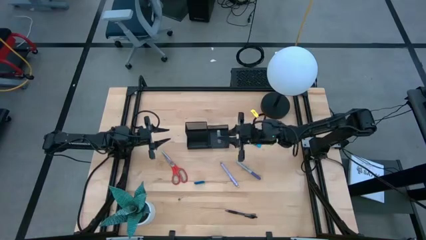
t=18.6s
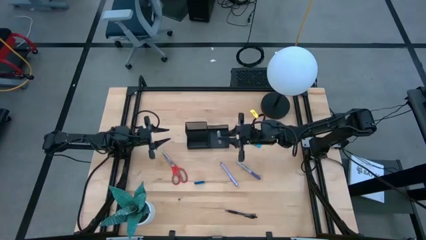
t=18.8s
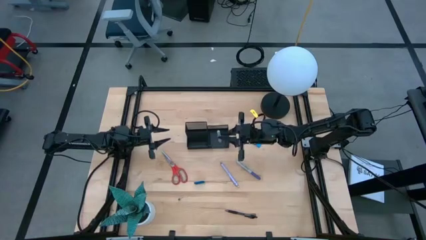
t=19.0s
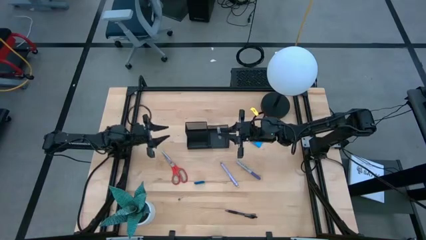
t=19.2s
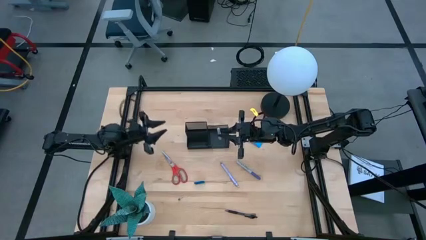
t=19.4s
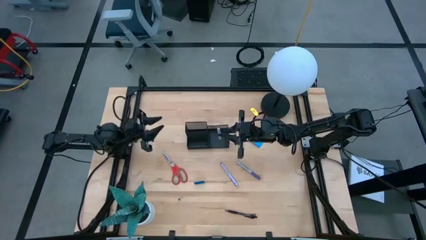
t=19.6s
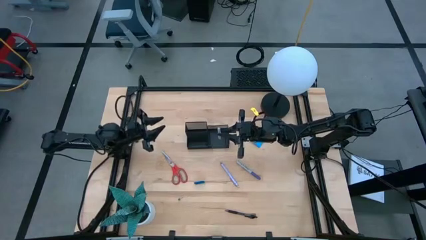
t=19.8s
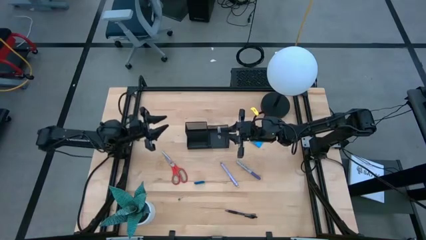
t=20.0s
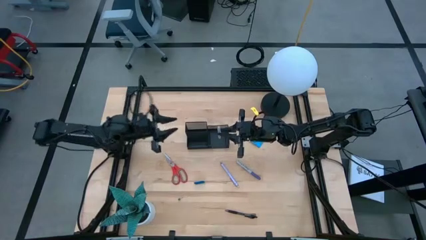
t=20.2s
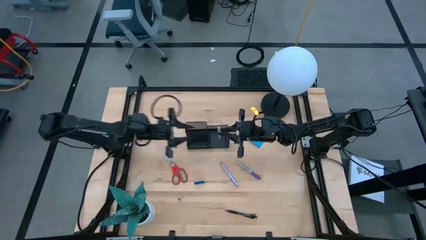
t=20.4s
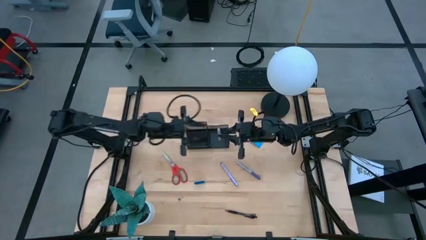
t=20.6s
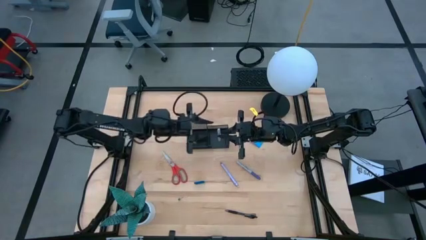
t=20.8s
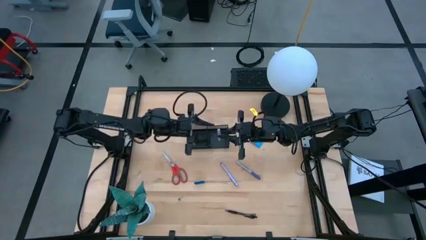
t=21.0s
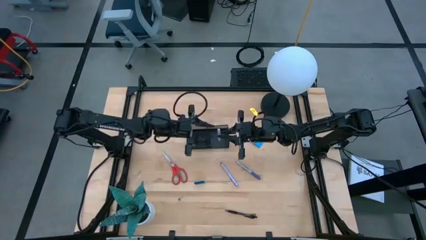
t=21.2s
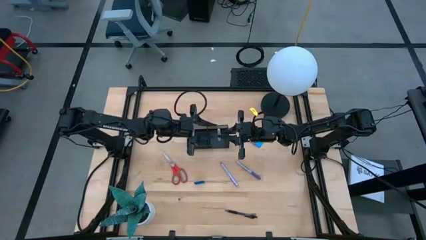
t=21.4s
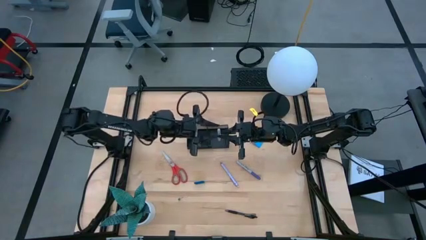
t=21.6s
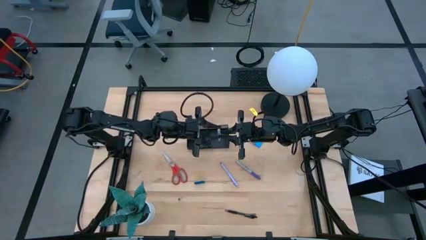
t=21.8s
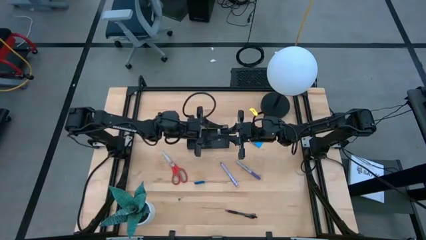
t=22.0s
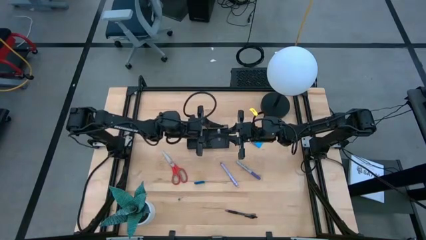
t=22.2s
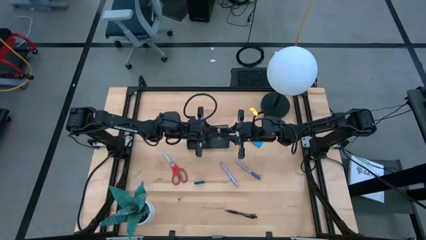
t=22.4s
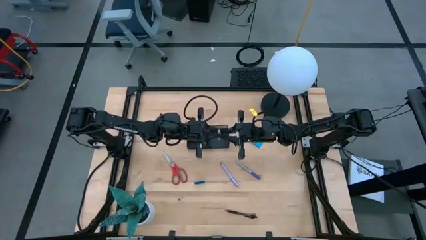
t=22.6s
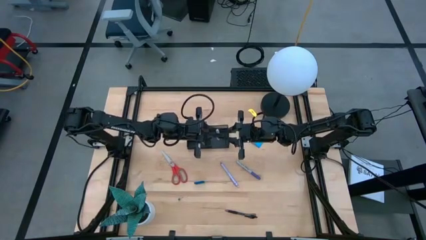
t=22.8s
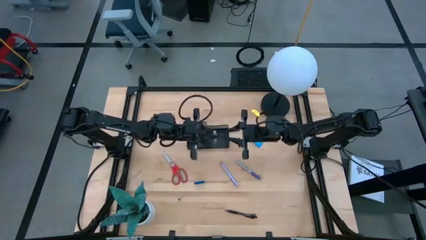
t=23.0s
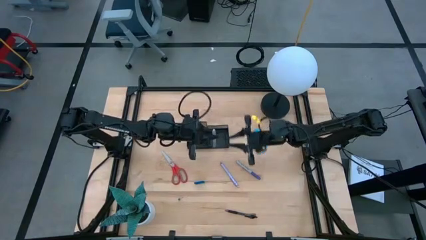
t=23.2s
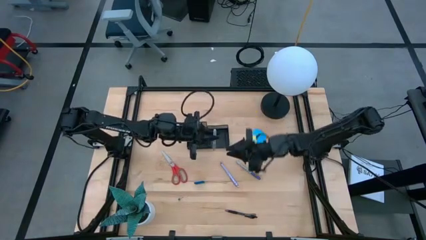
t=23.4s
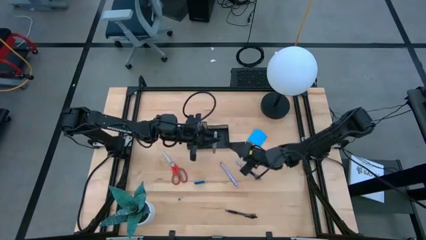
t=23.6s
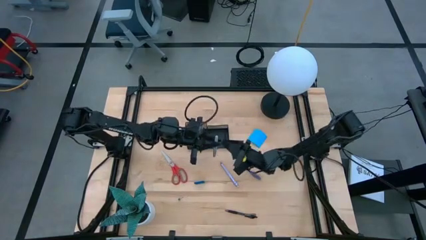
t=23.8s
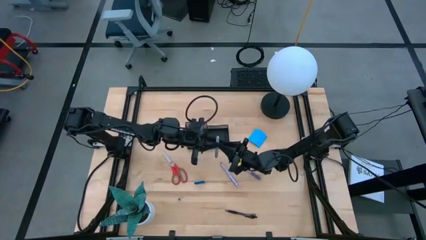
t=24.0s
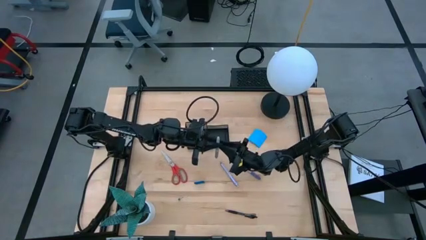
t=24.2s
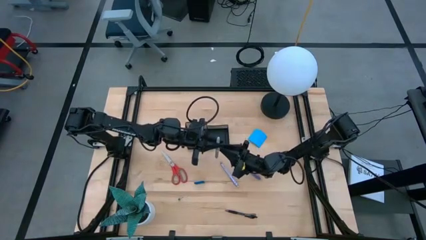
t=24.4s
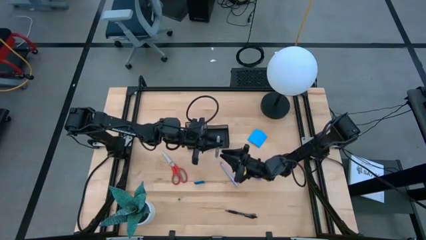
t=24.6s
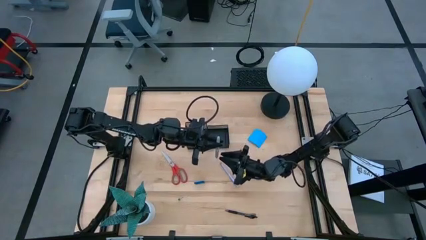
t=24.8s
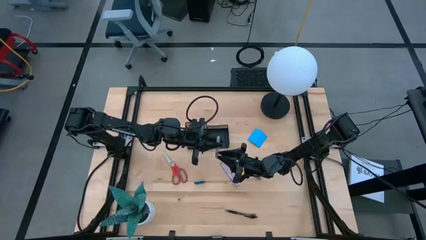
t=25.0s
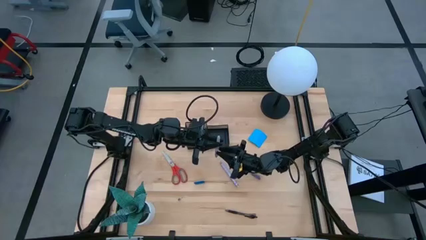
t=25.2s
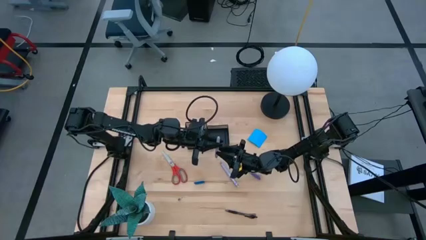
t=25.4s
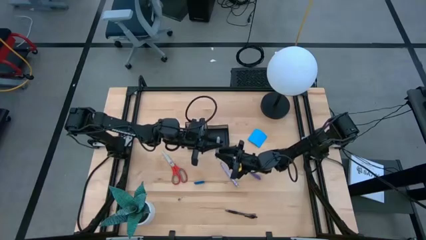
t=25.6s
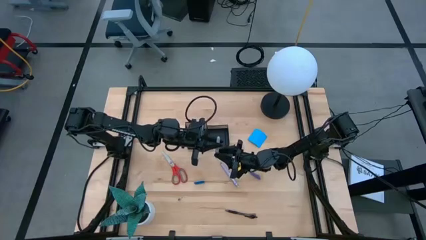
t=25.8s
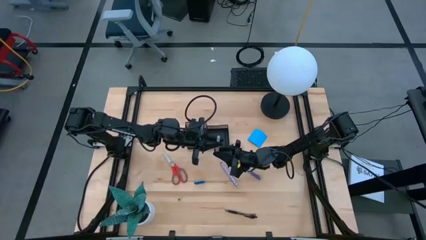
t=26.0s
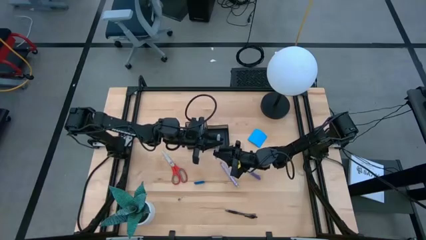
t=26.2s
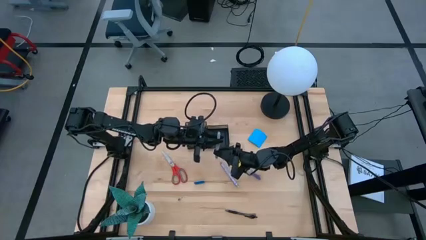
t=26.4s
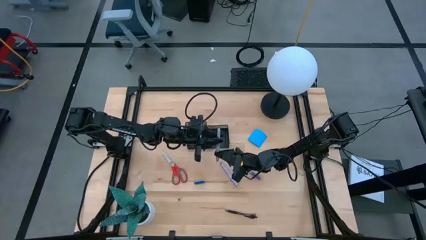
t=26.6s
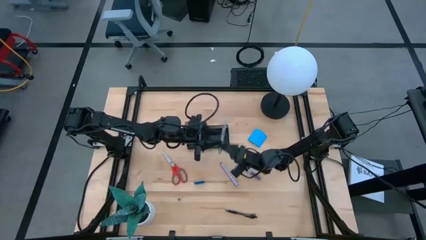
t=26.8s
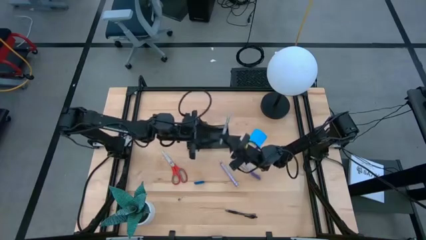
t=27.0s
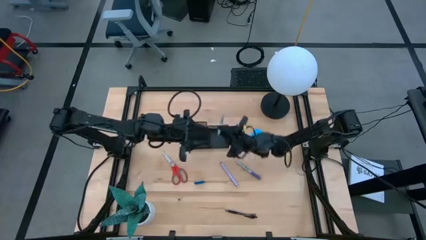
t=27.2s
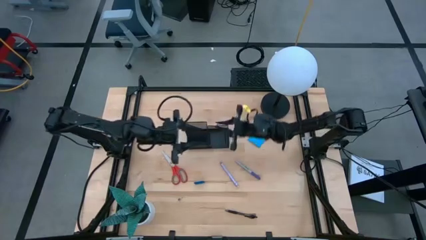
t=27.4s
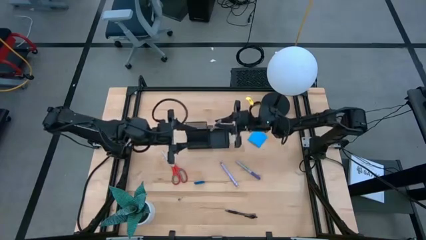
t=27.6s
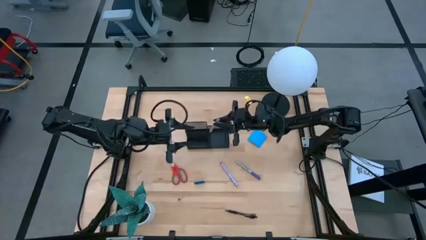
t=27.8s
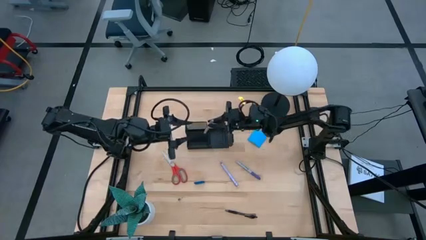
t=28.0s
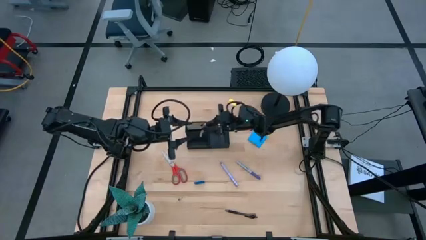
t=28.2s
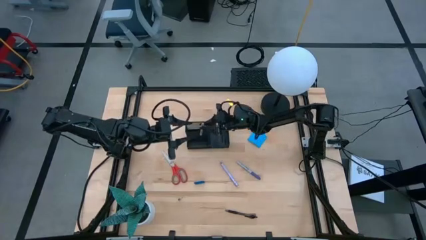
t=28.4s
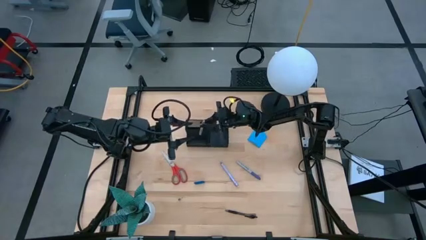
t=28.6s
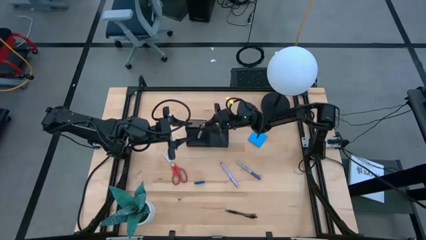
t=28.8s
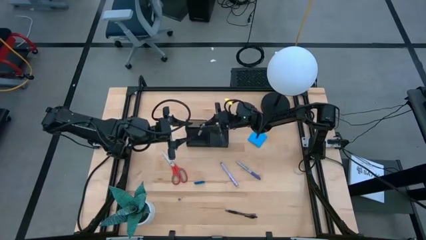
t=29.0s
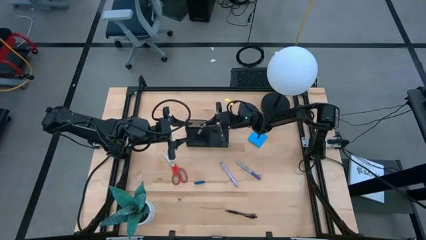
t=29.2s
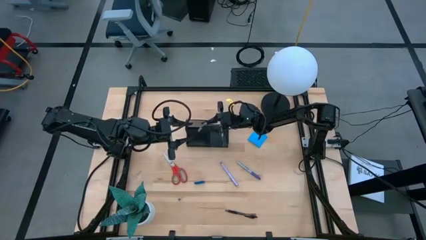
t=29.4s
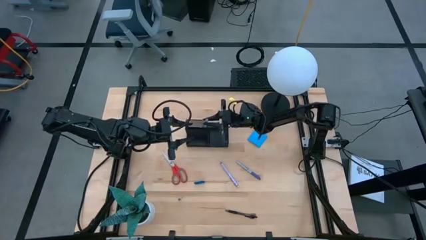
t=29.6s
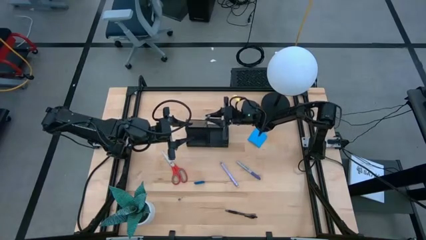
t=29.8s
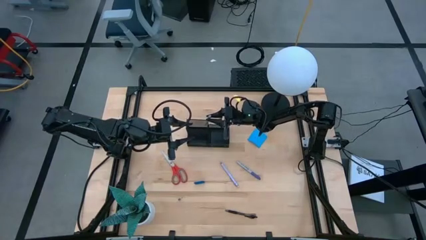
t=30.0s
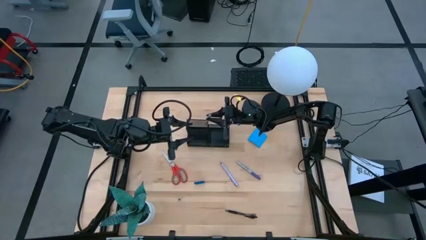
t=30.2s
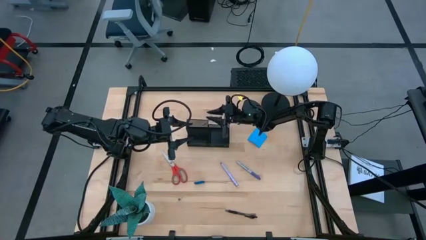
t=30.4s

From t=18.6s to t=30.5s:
Task: Pick and place office supplies into organizer
Put the gray marker pen into the desk organizer

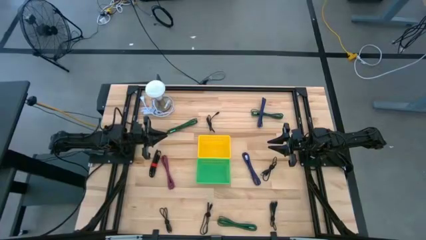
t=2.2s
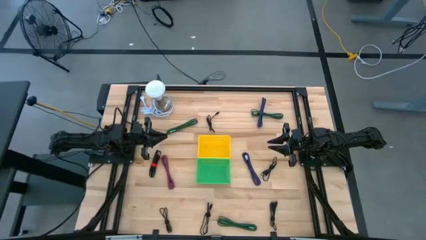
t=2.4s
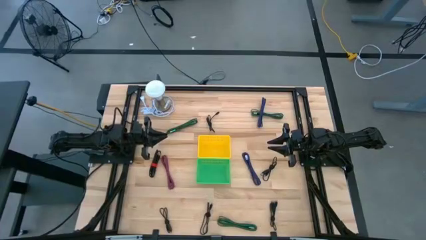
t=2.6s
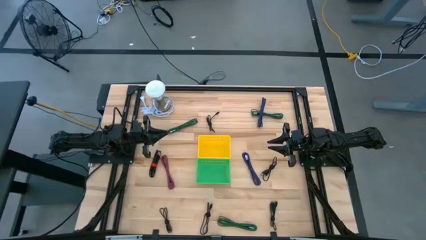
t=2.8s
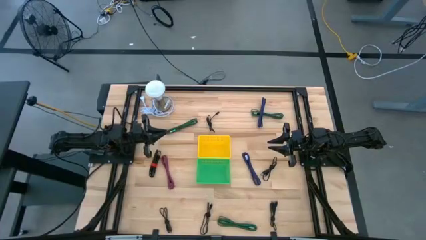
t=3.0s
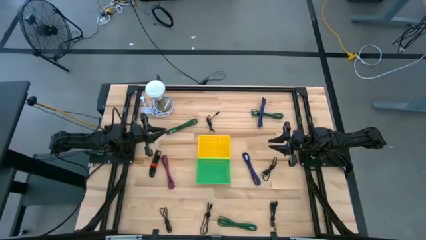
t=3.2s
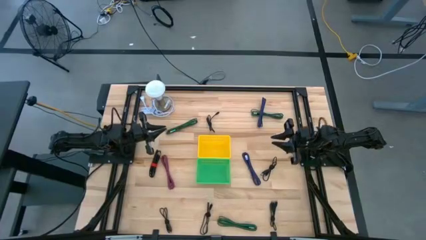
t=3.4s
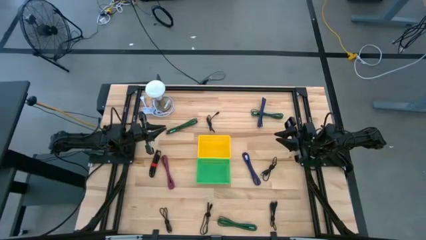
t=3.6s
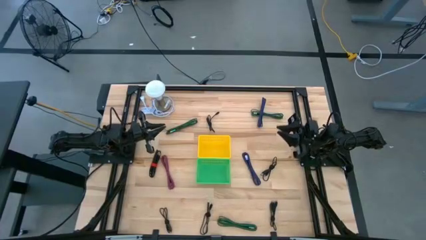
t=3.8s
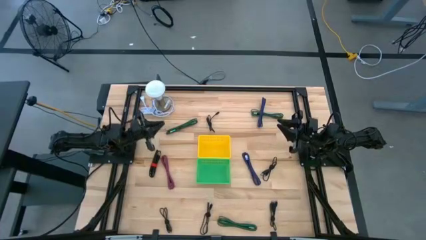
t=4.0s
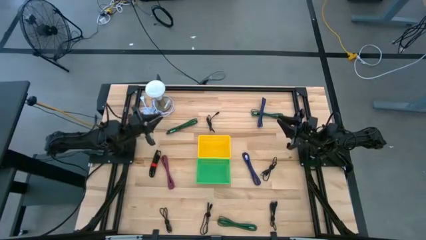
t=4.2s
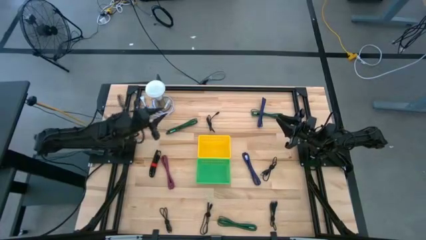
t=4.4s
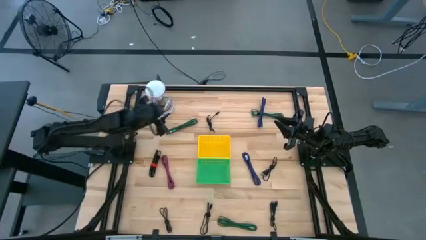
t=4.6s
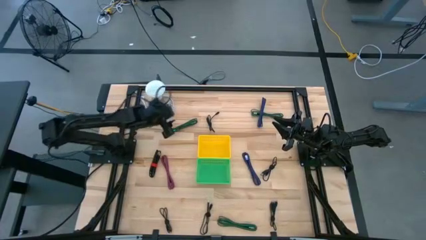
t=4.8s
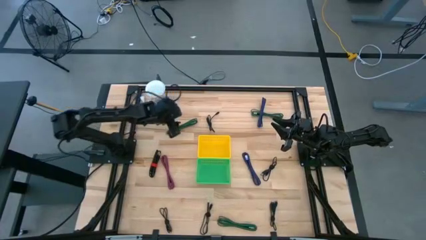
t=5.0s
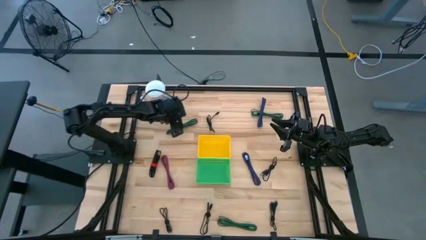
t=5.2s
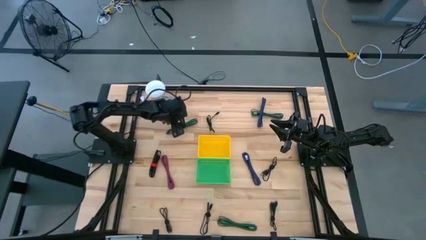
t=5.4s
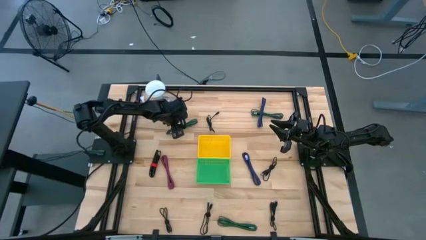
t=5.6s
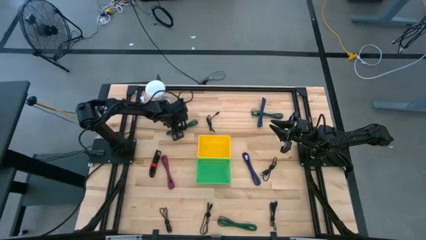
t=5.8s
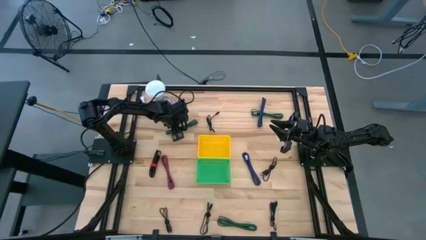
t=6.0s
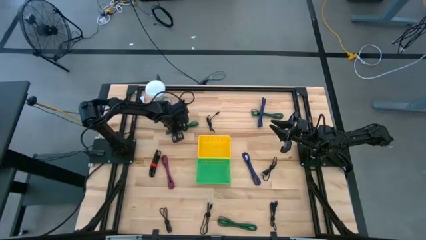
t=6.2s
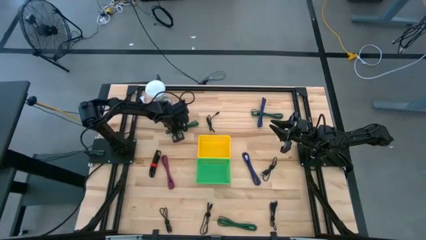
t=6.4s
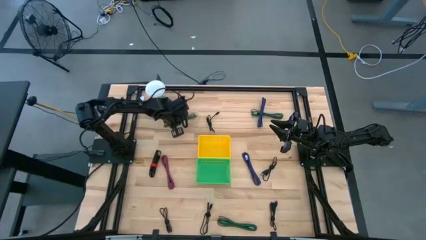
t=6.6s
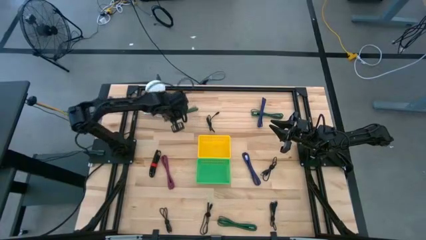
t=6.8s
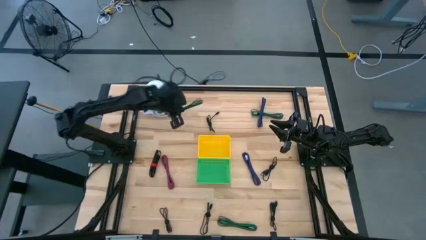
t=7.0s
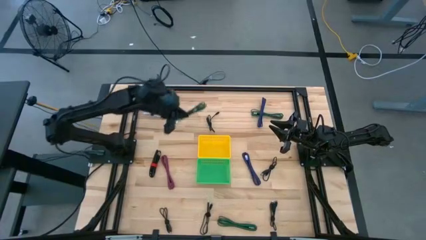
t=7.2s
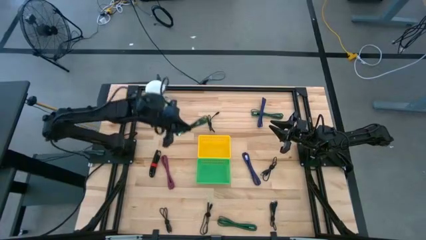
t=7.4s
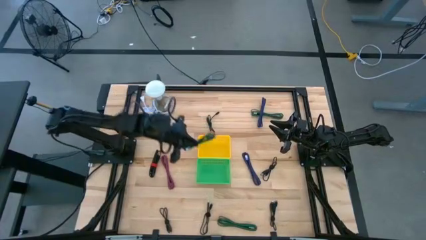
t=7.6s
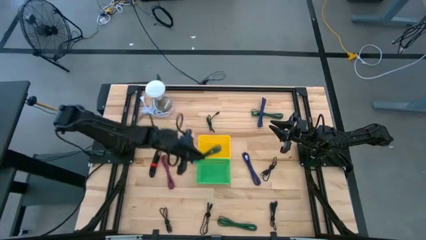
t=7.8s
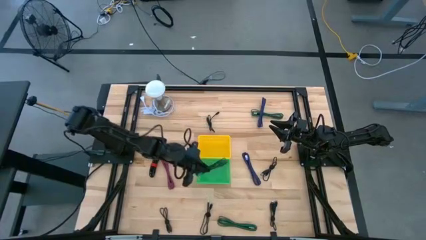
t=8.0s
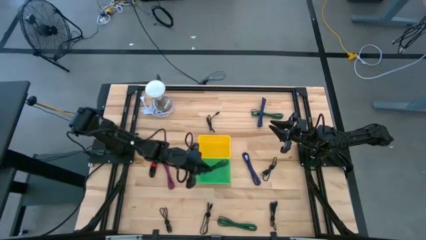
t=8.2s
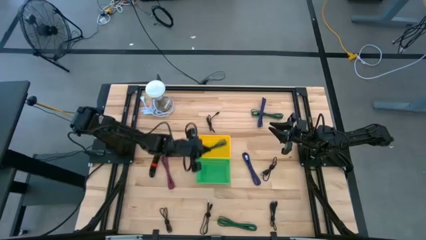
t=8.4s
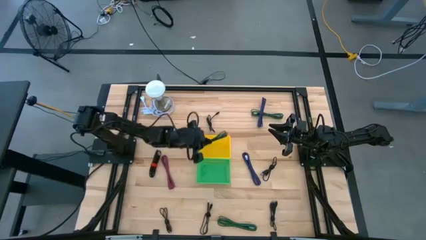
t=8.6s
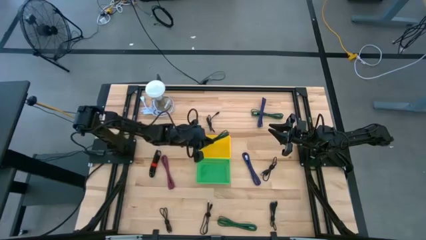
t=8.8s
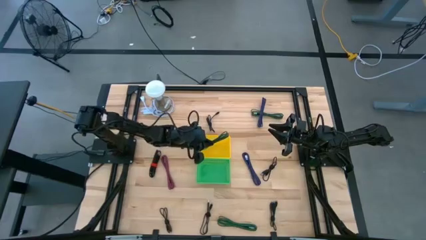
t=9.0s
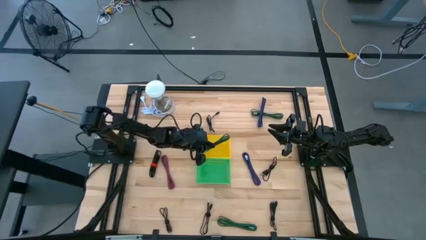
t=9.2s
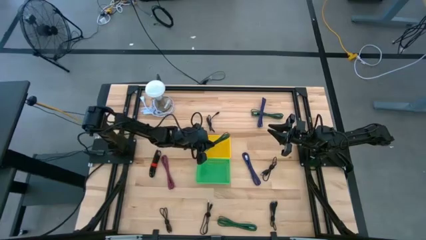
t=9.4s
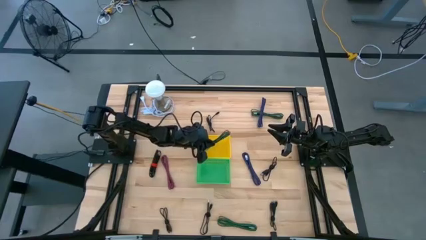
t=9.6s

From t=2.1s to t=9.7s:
Task: Pick & Place USB Port
Put the green and black USB cable into the yellow bin
